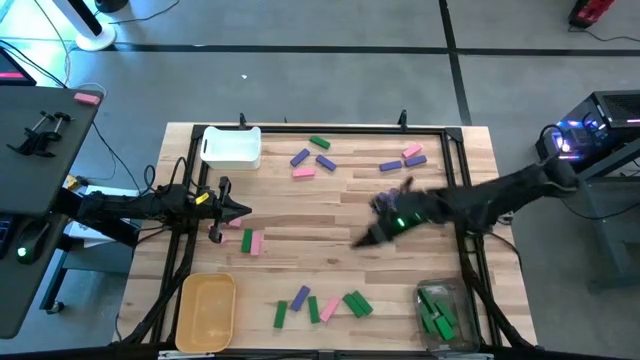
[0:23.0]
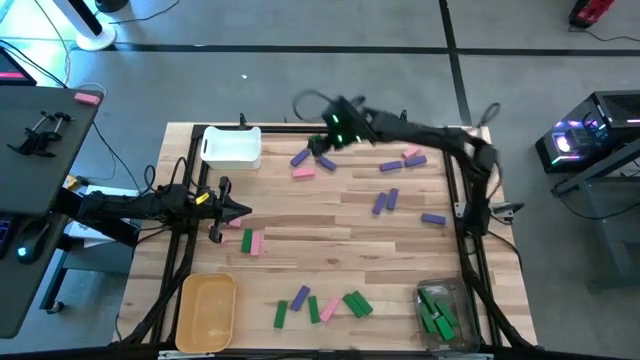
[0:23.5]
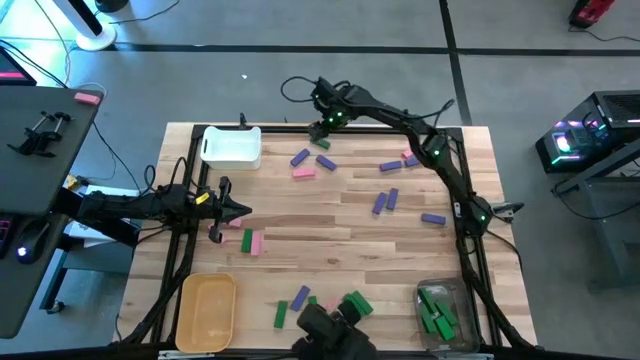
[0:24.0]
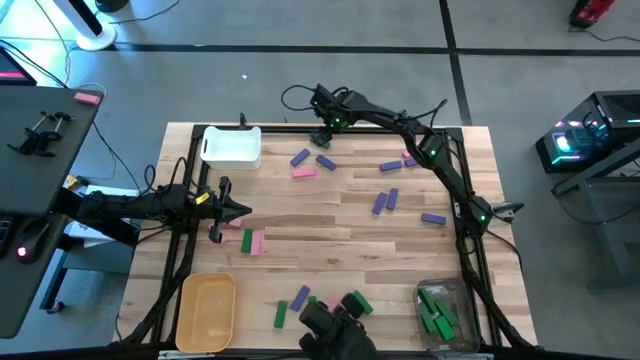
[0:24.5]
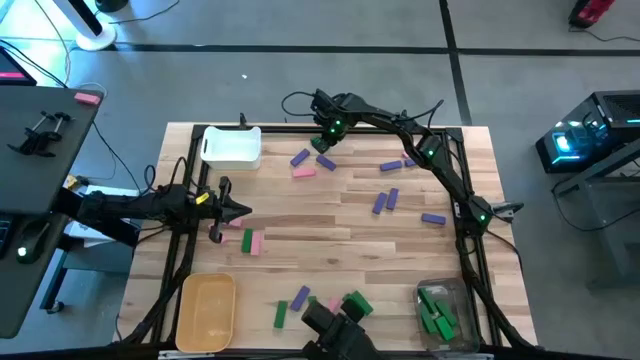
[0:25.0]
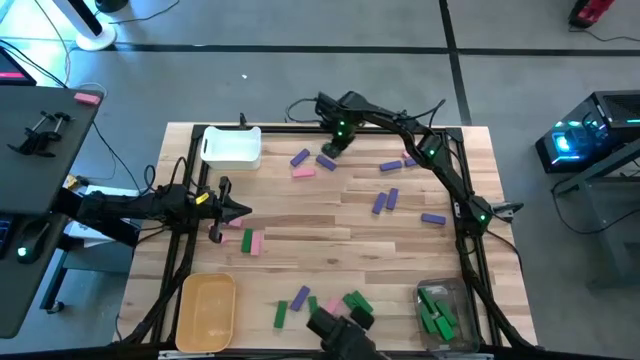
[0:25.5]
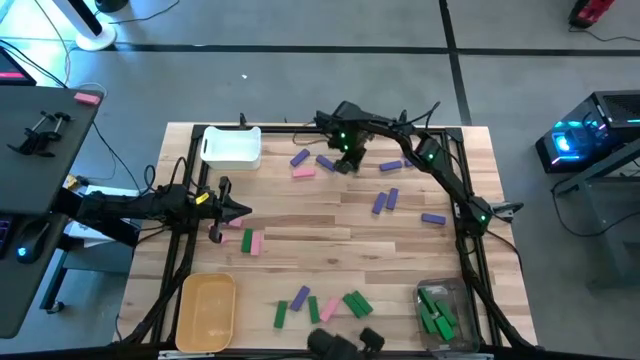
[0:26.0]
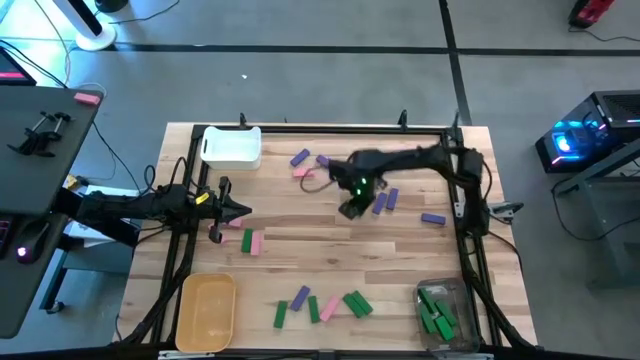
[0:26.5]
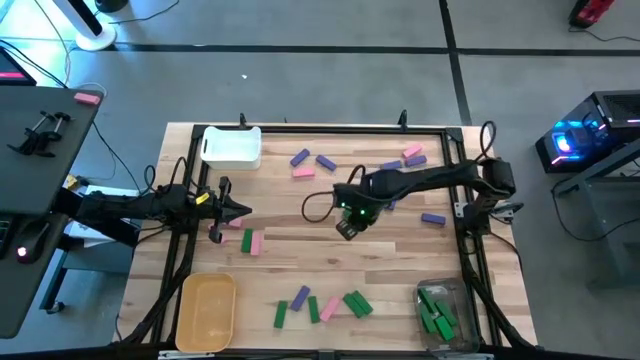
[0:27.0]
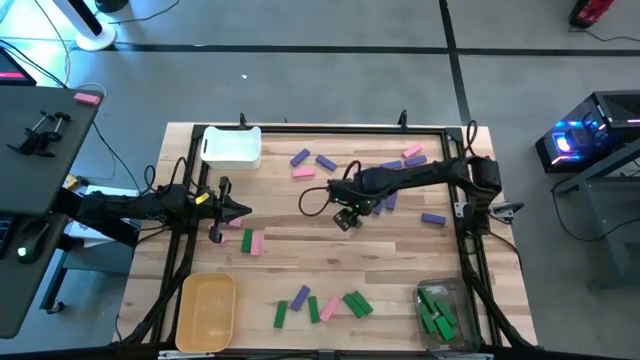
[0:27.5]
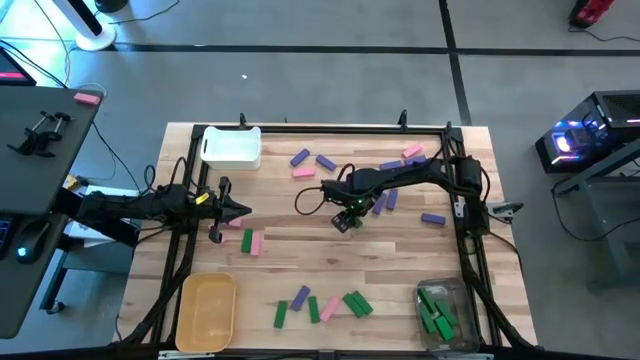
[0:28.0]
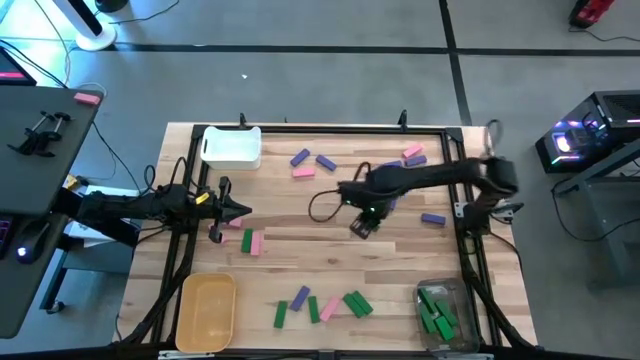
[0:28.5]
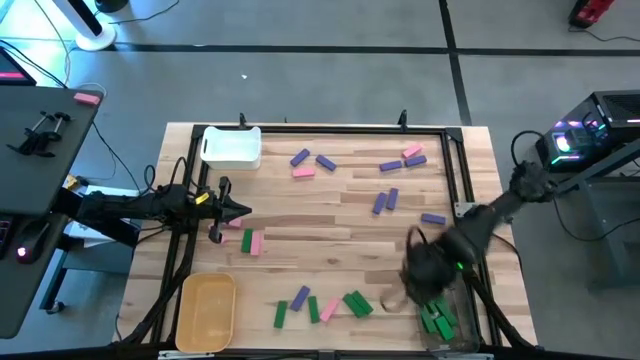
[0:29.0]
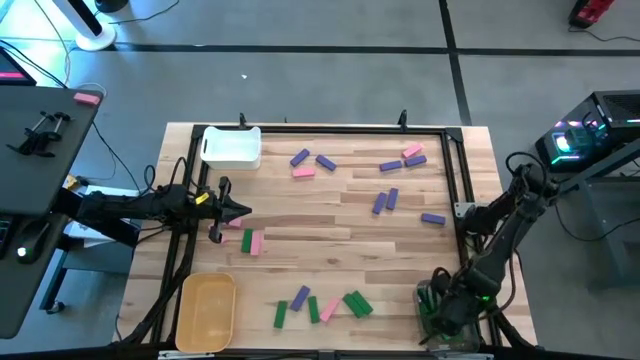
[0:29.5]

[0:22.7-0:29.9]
Task: Sort blocks
Put the green wooden block into the black bin

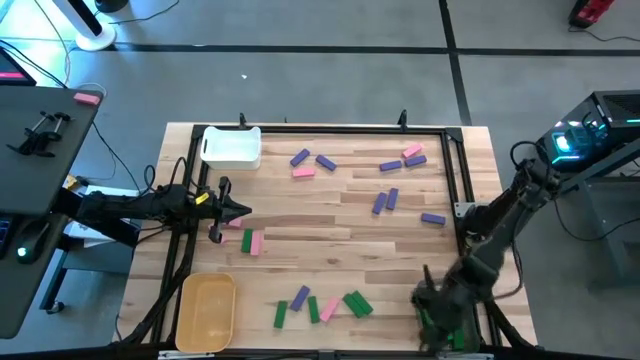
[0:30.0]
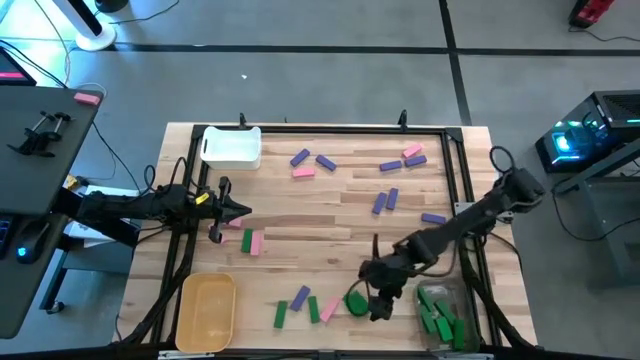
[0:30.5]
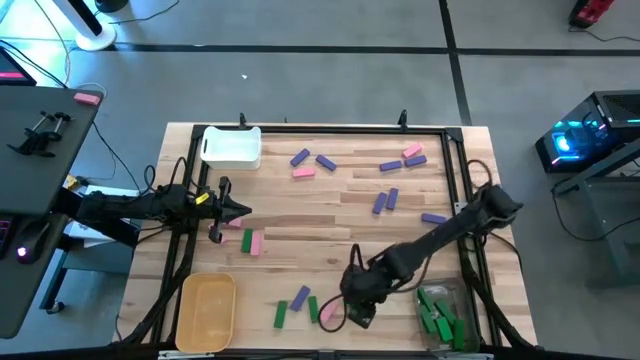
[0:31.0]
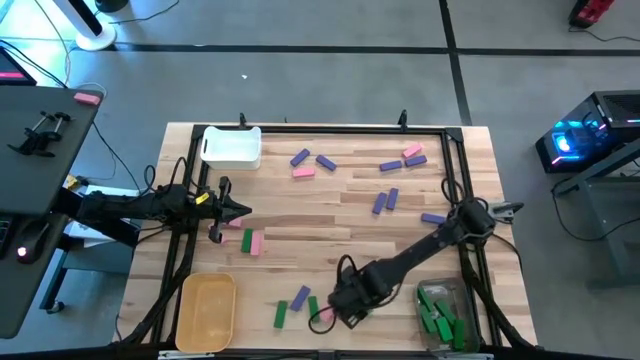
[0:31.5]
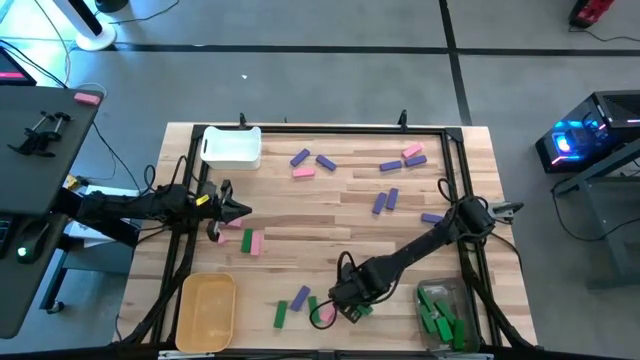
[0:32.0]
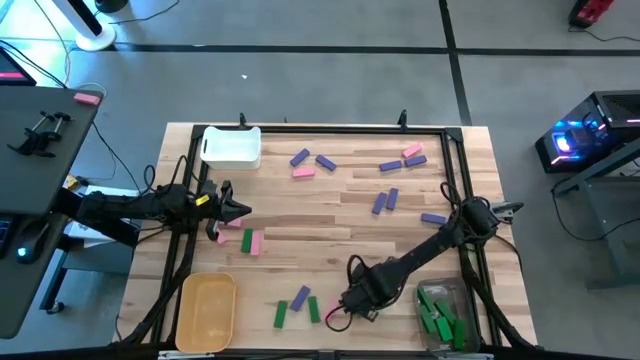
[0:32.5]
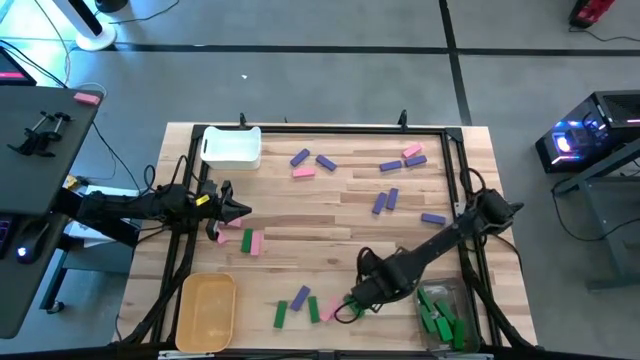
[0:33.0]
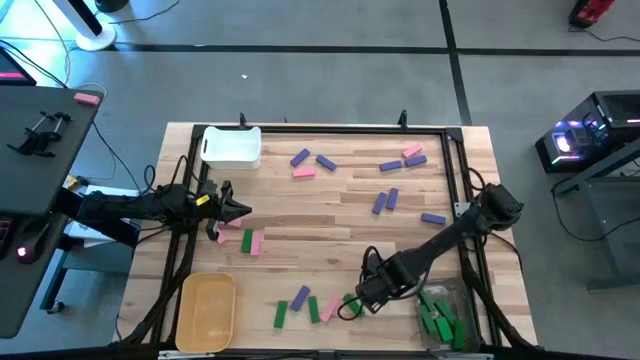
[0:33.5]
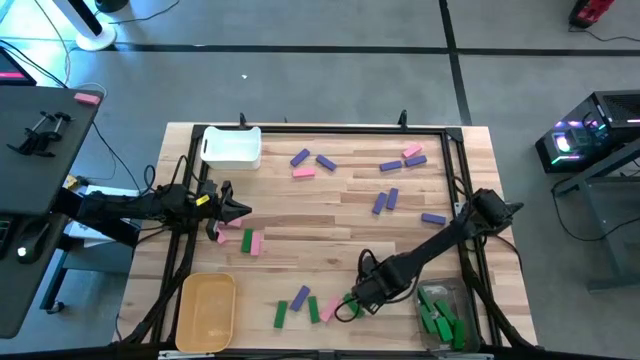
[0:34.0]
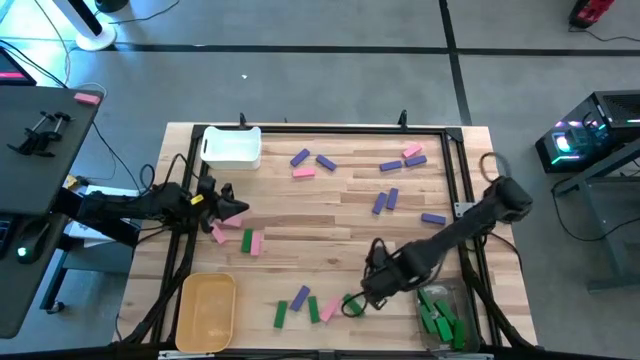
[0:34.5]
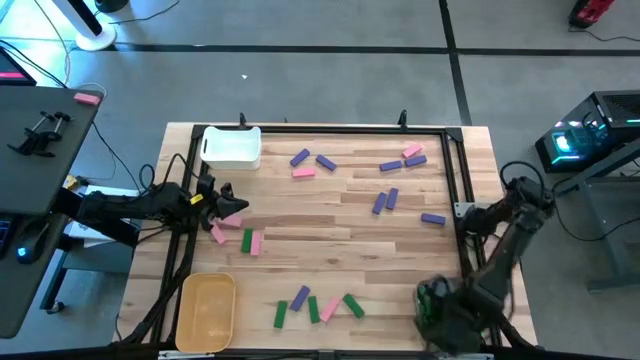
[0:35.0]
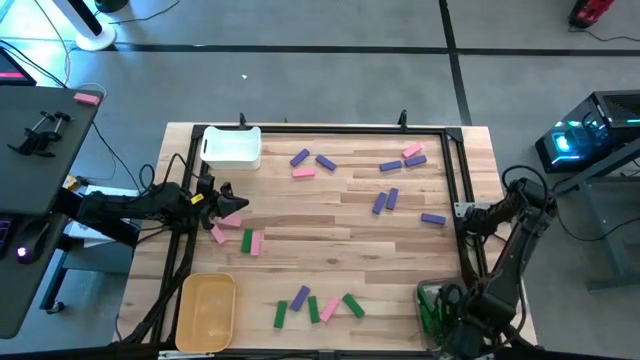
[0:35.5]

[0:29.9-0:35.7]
Put the green wooden block into the black bin

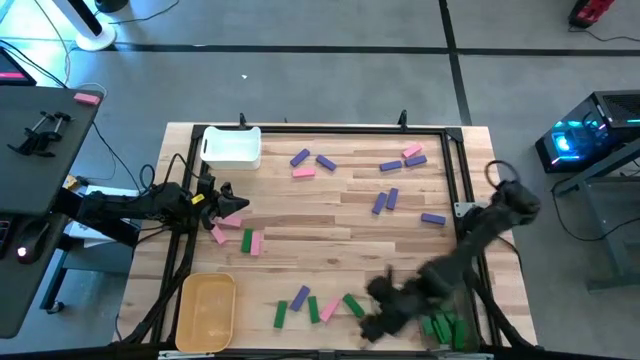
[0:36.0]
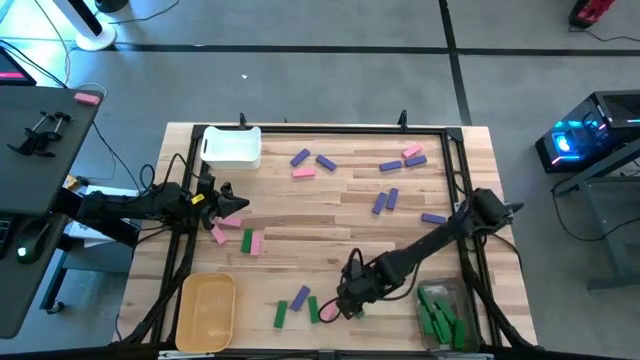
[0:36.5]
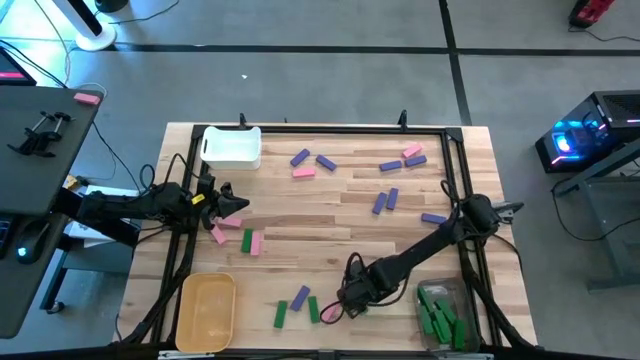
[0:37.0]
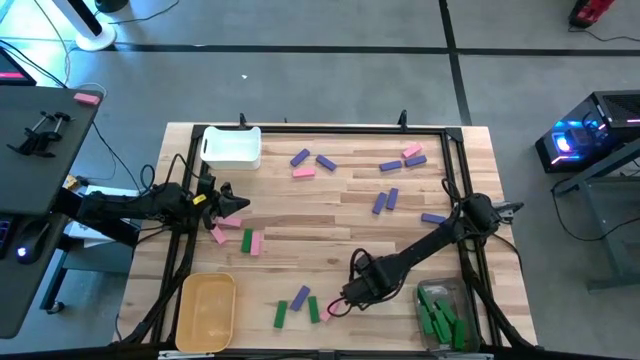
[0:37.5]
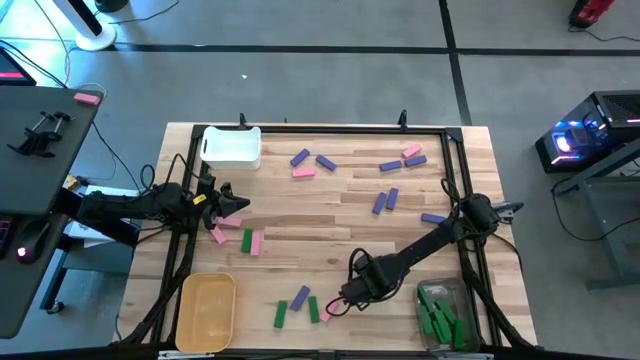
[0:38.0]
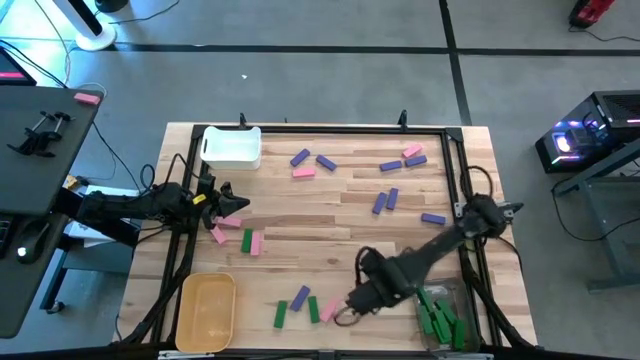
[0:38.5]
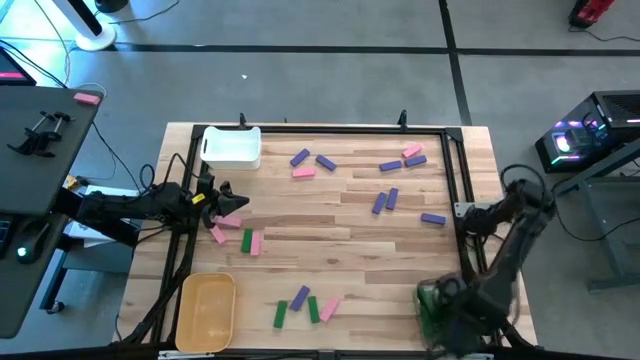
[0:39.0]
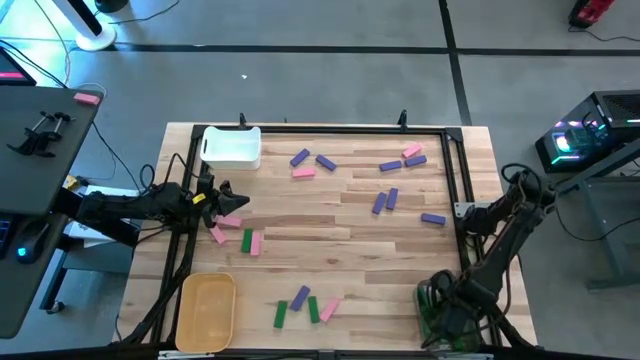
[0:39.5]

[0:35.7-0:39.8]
Put the green wooden block into the black bin

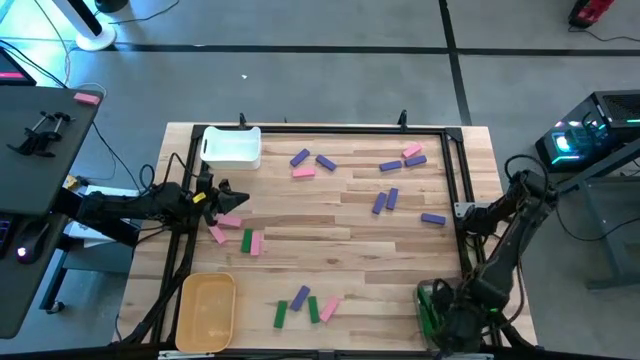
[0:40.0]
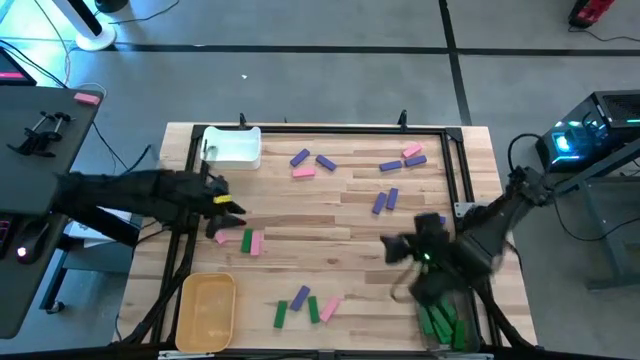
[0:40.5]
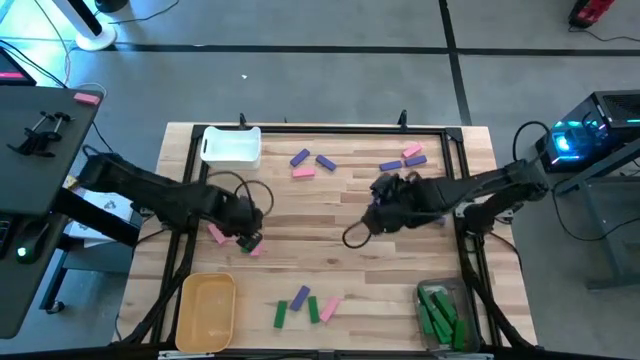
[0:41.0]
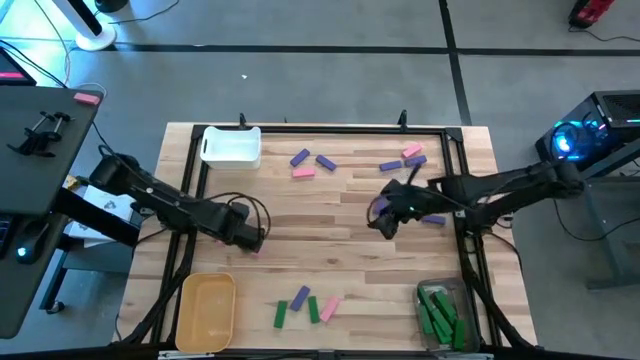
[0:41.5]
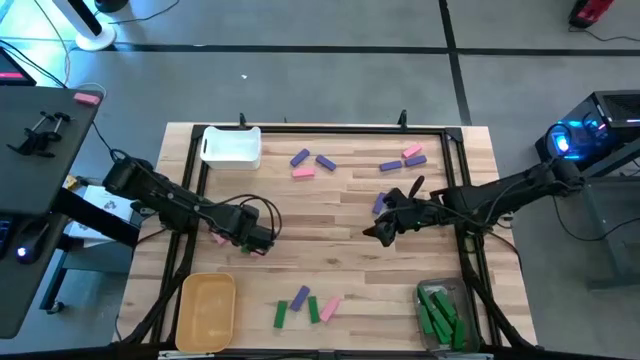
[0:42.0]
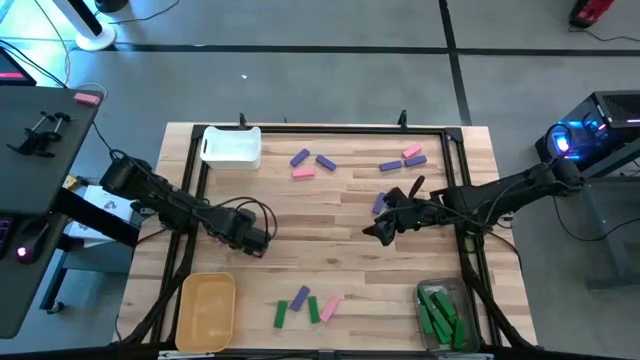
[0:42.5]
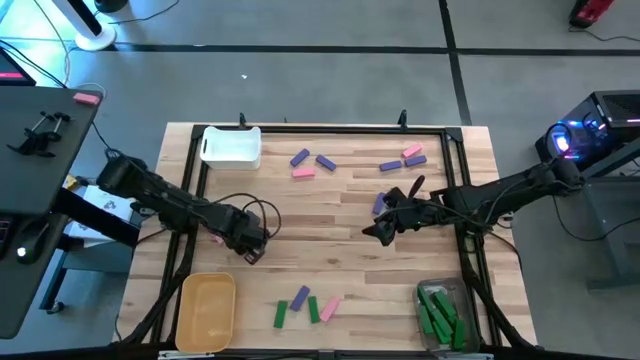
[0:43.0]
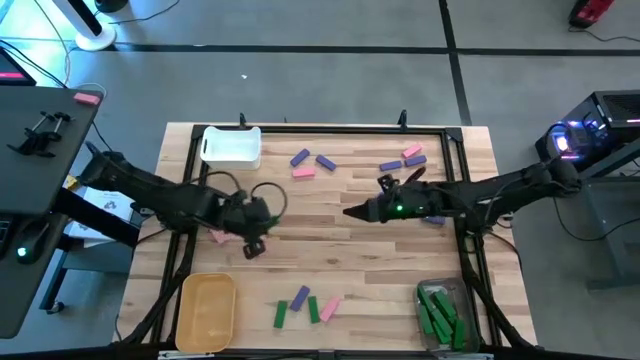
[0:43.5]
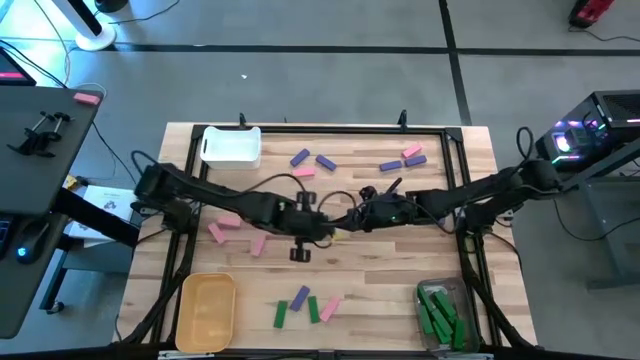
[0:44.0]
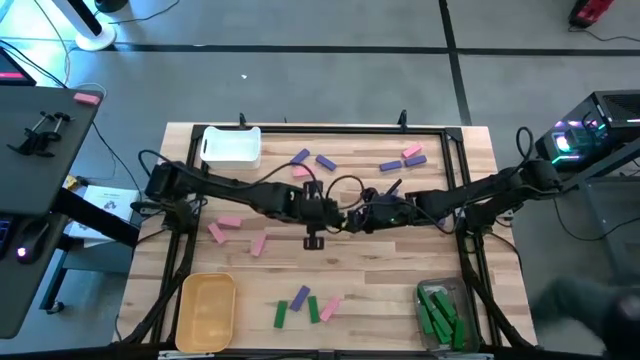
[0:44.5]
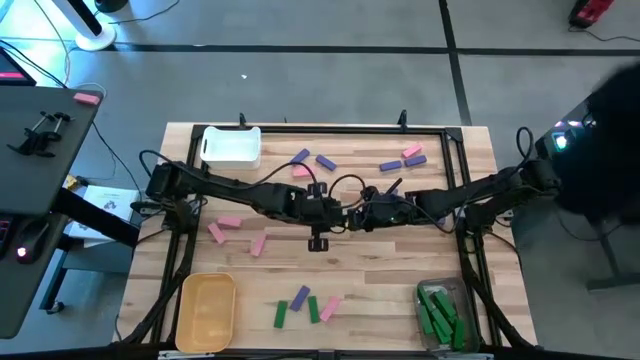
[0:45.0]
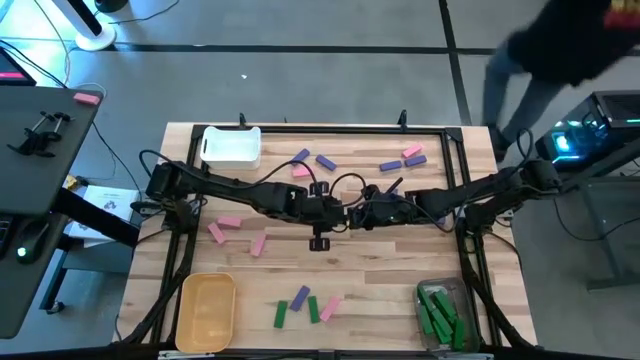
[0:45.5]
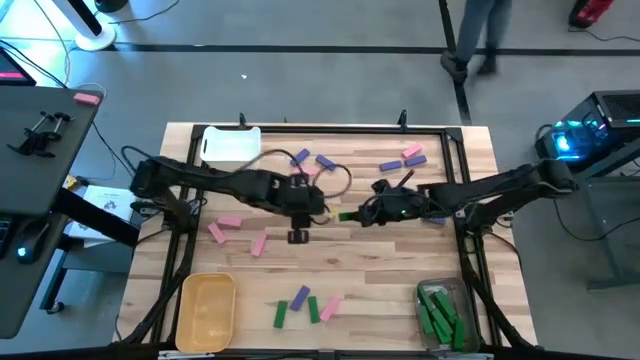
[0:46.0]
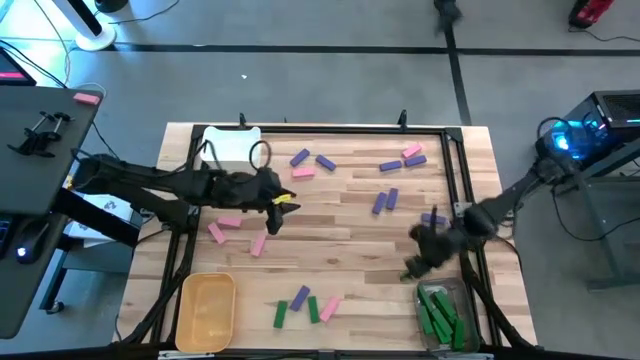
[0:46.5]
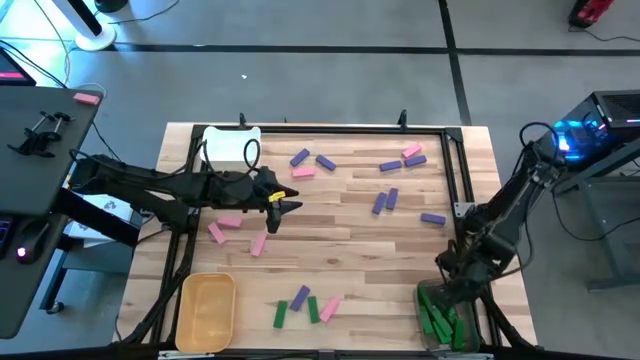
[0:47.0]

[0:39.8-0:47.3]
Put the green wooden block into the black bin
